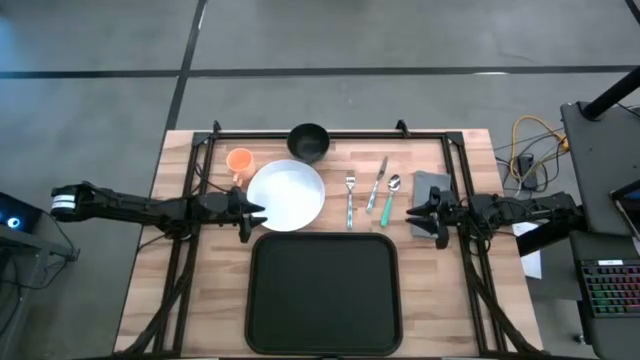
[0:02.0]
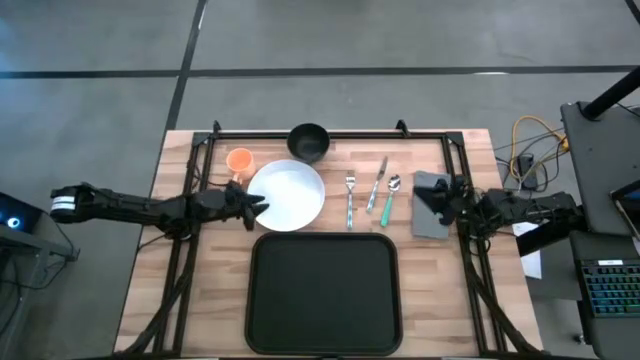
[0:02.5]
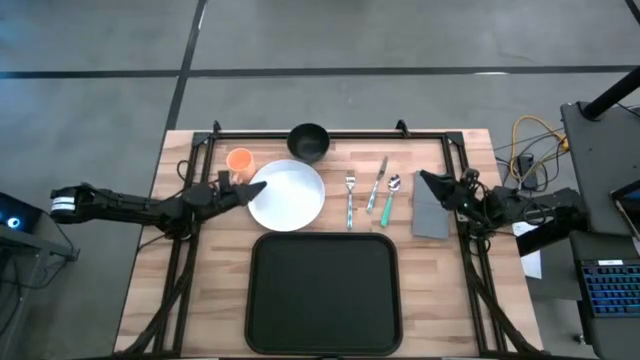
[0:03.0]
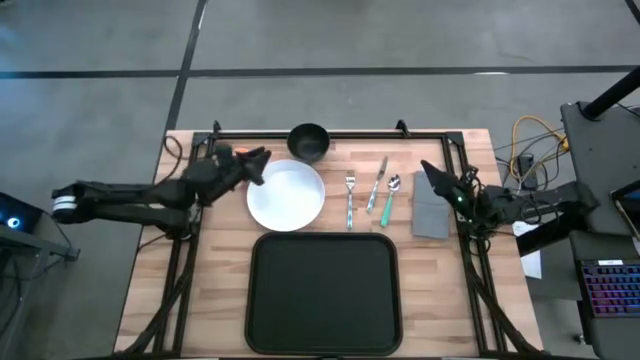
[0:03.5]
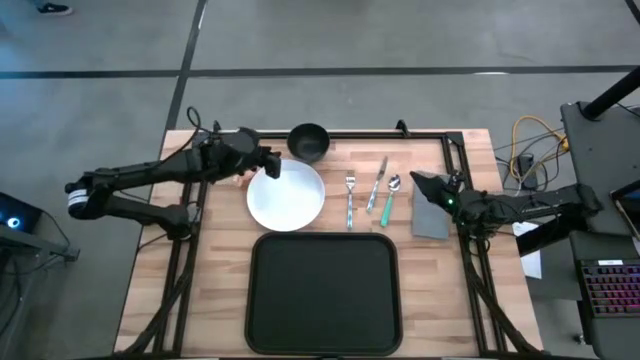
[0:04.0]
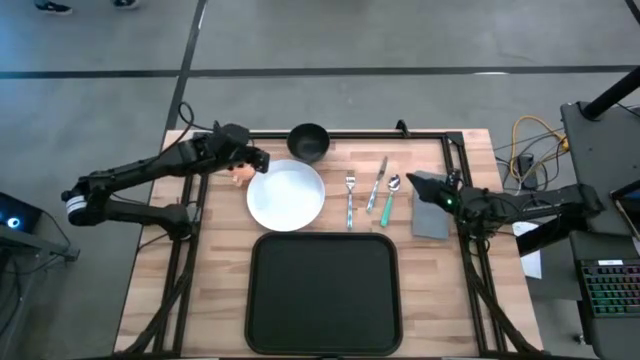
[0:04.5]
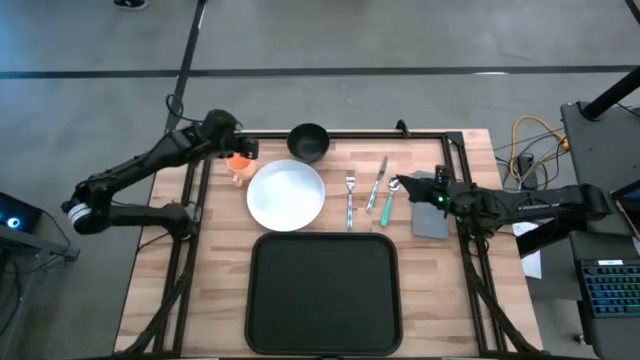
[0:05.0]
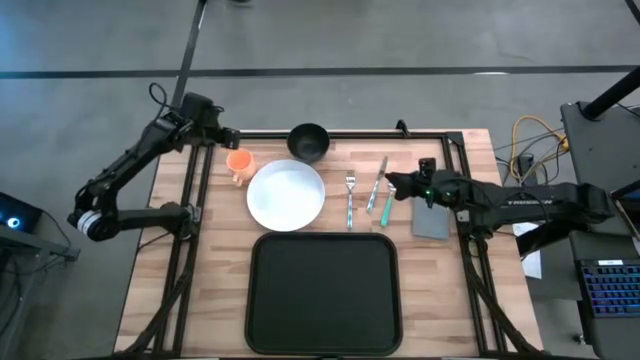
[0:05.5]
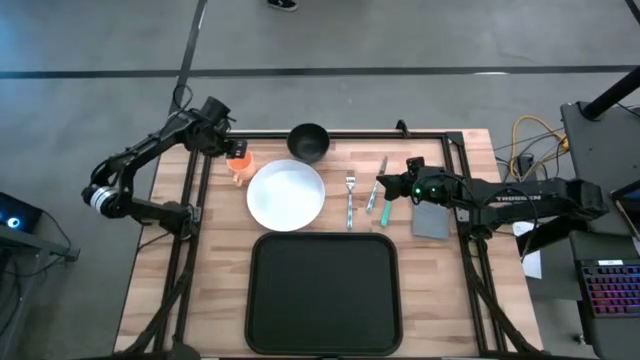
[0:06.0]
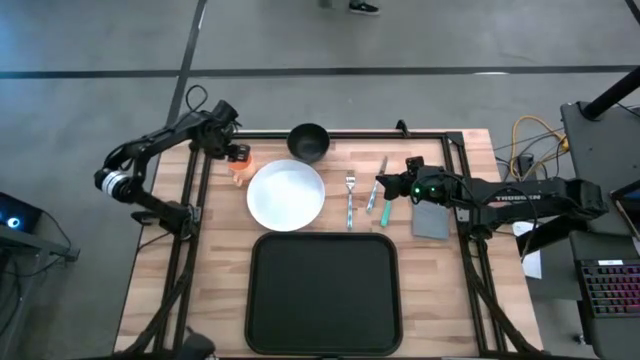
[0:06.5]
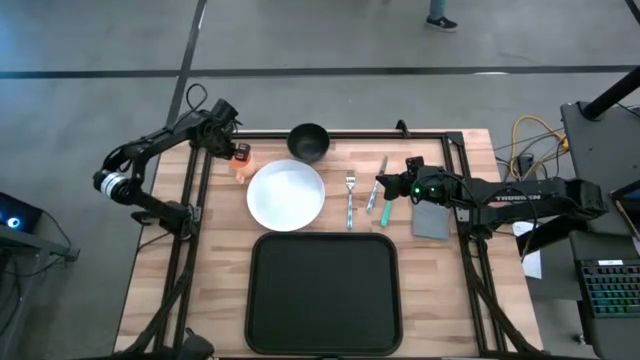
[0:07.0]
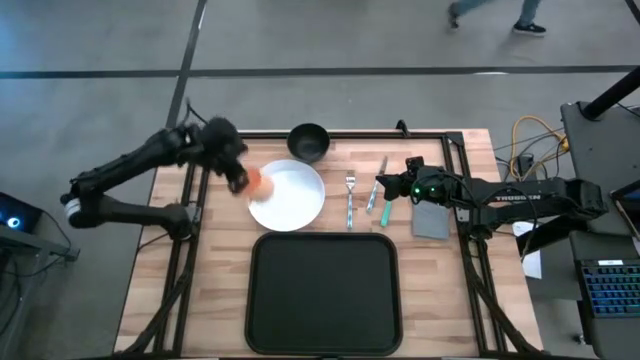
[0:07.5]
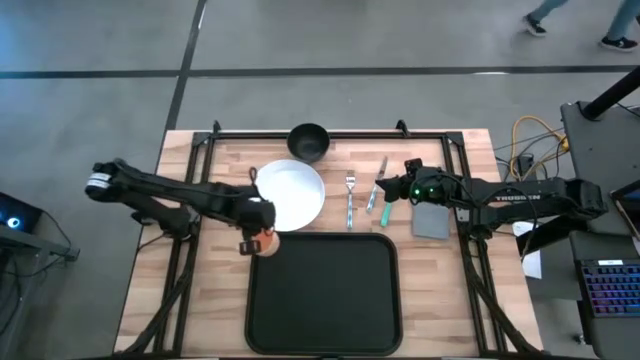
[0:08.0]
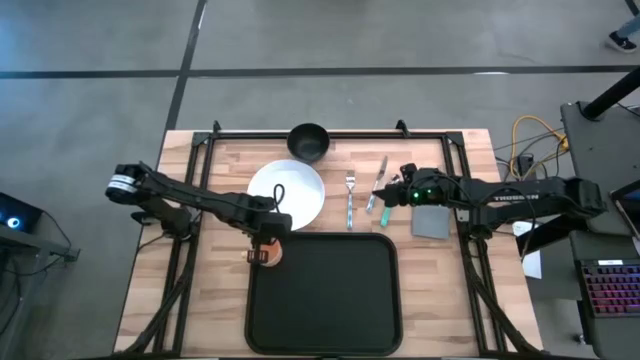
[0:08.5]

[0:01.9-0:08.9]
Task: Set up tray
Put the yellow mug on the black tray

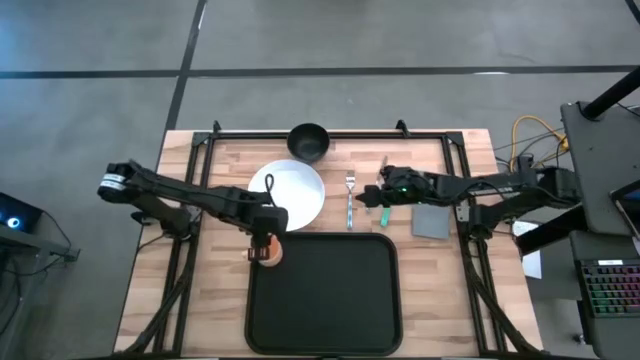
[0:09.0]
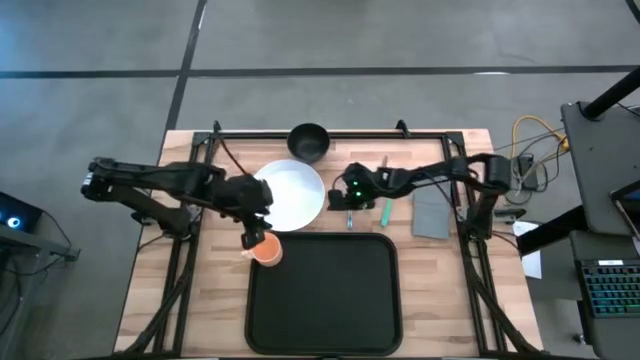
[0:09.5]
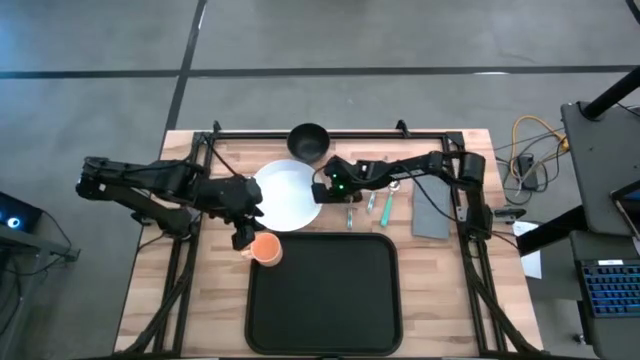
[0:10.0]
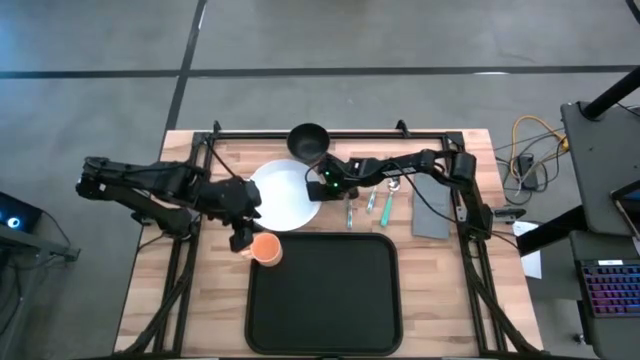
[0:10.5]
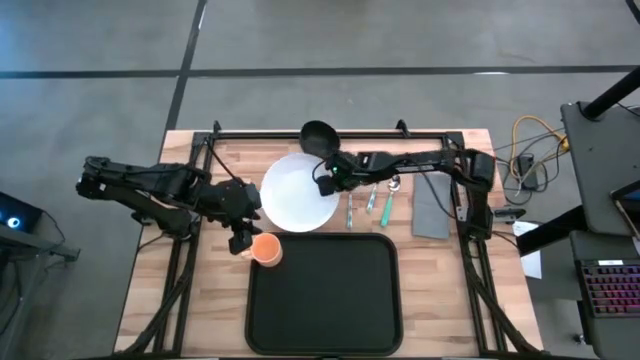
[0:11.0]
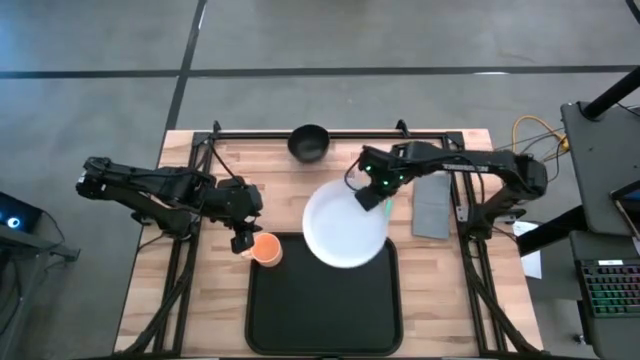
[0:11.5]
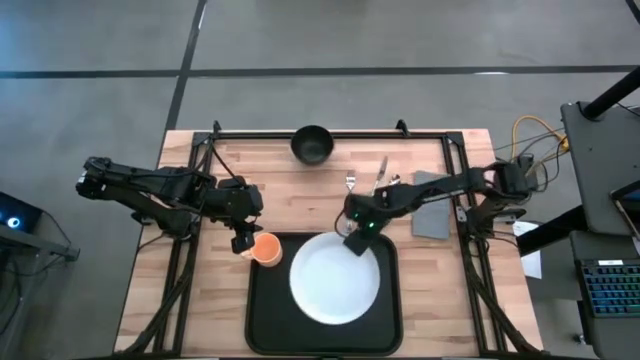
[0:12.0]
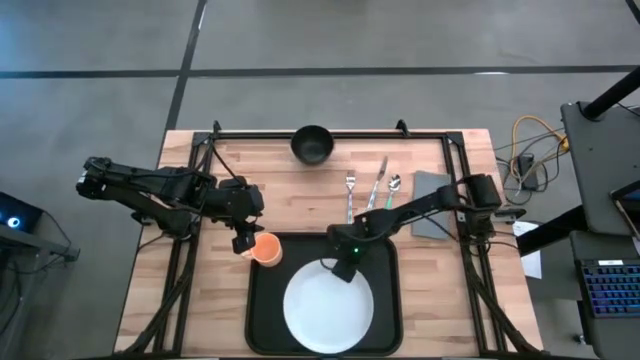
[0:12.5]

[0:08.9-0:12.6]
Put the white plate on the black tray

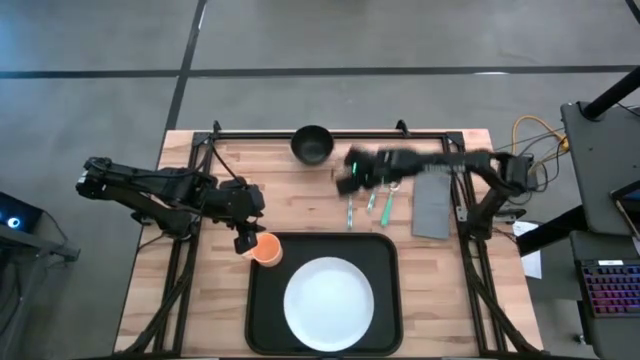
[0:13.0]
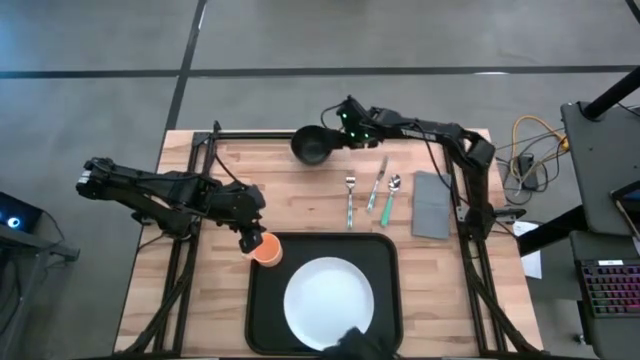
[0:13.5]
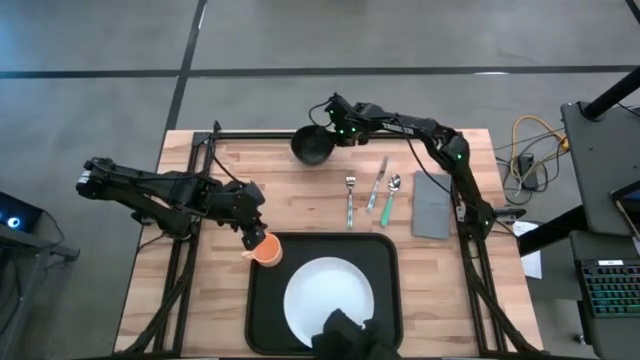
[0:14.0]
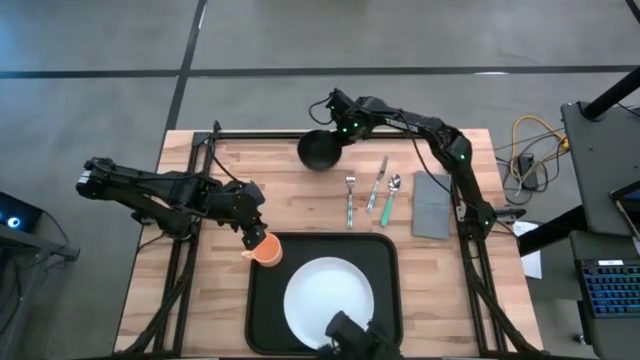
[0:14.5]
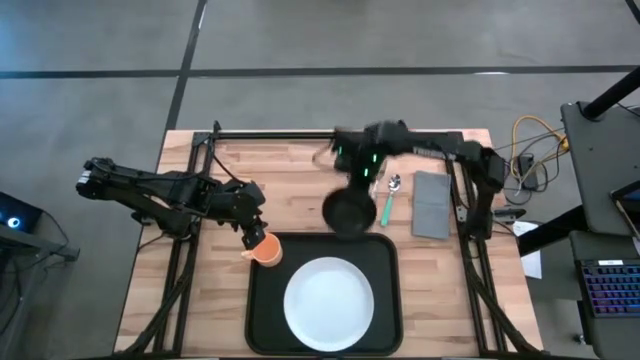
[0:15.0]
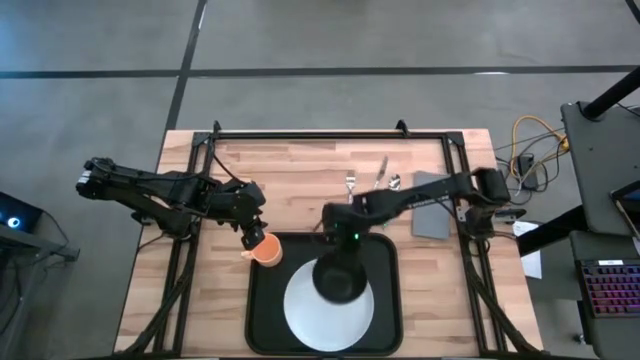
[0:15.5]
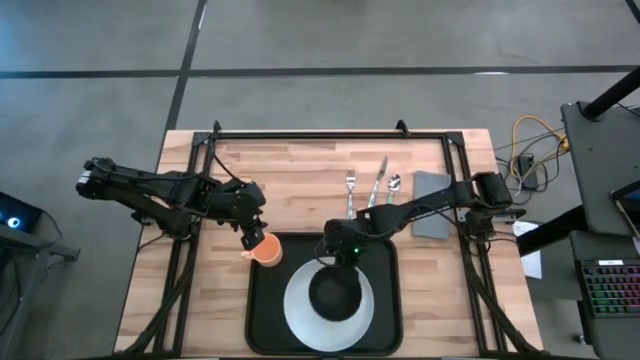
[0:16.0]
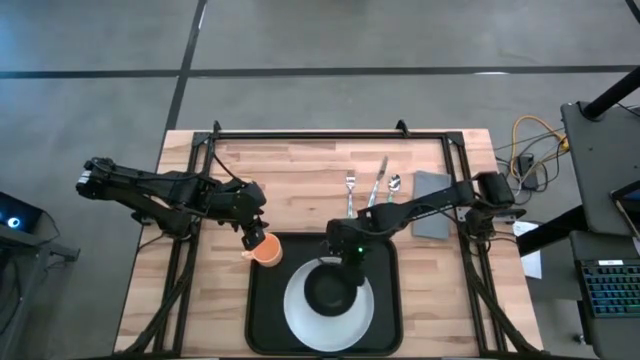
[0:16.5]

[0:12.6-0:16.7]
Put the black bowl on the white plate

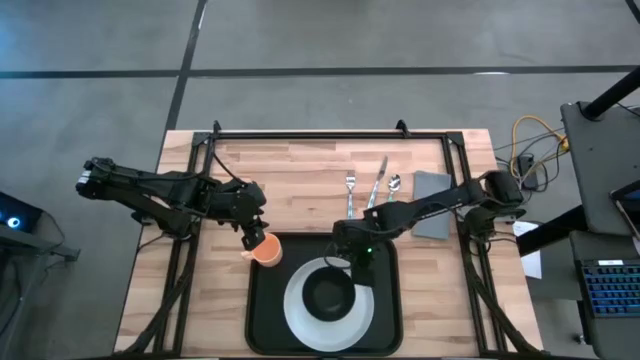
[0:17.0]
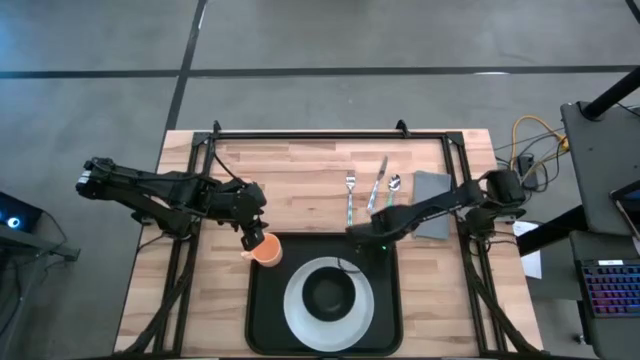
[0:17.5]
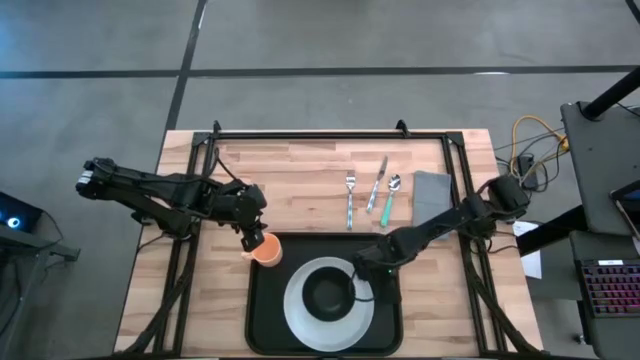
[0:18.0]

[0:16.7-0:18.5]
Adjust the white plate

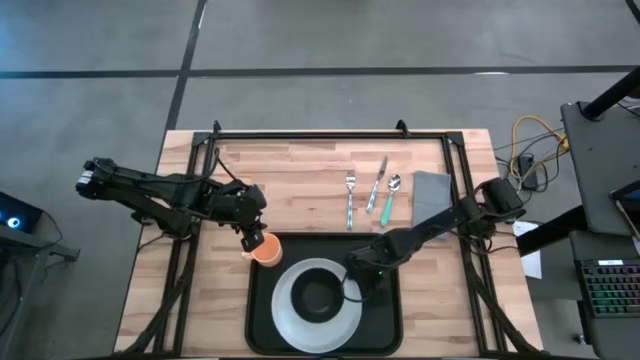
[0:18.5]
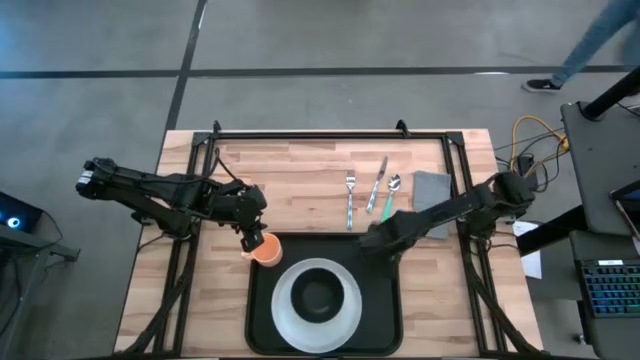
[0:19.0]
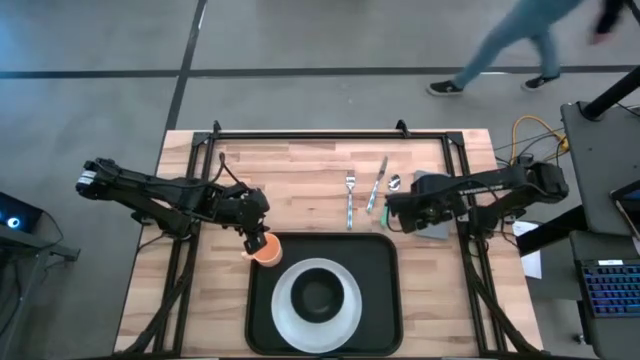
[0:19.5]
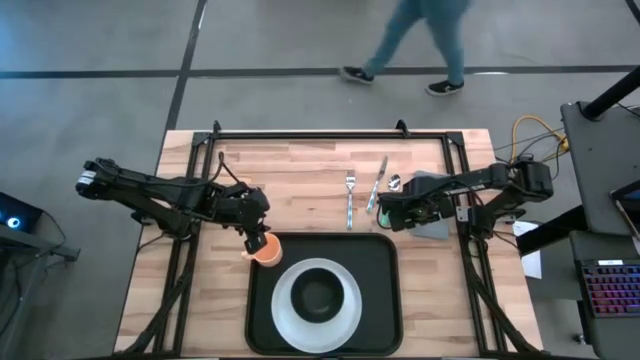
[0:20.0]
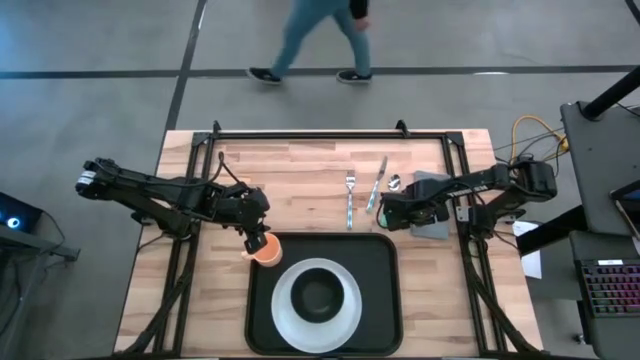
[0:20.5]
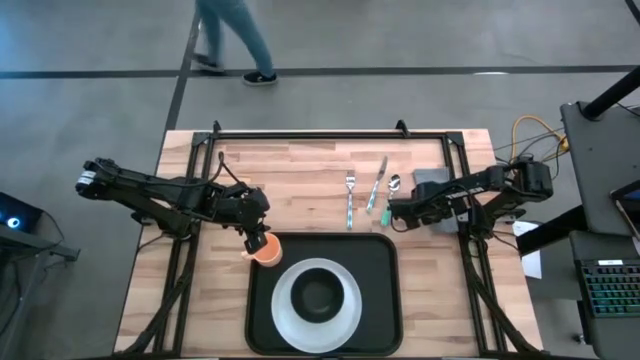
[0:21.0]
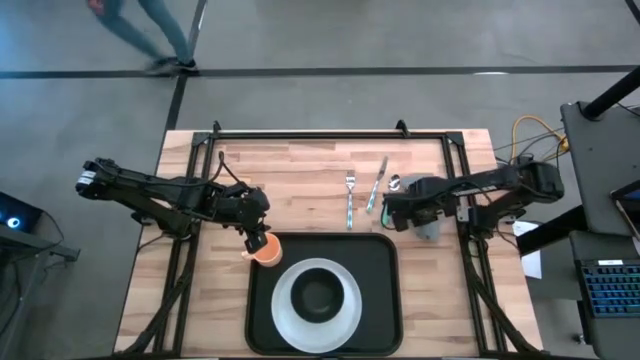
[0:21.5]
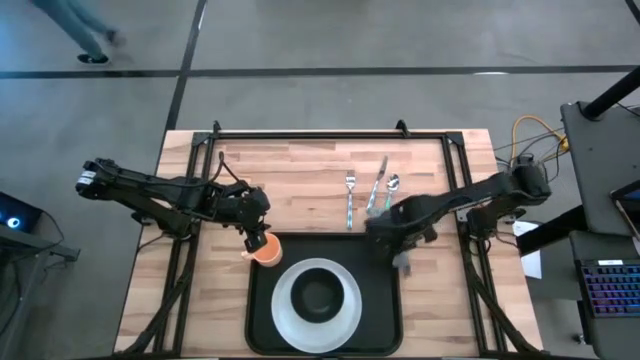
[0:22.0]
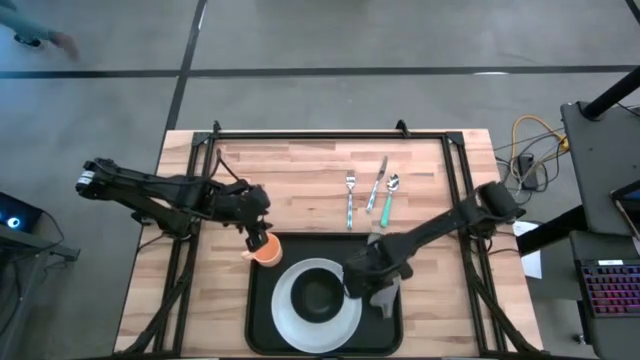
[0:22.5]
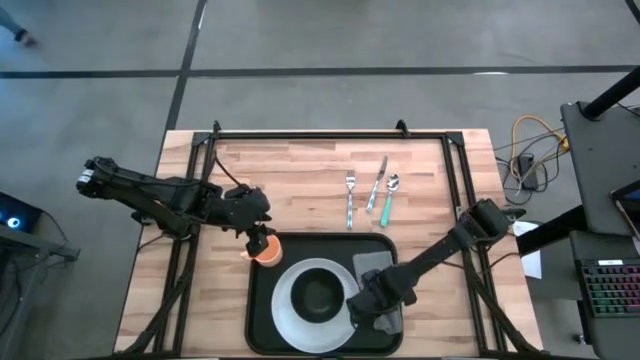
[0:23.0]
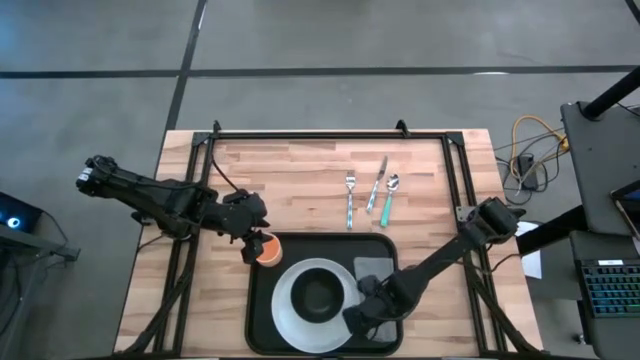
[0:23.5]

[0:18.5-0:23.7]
Put the gray napkin on the black tray to the right of the white plate
